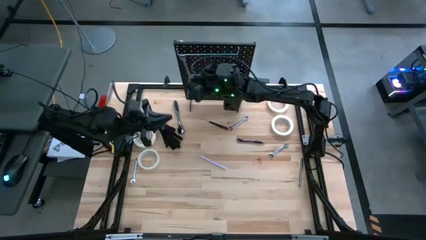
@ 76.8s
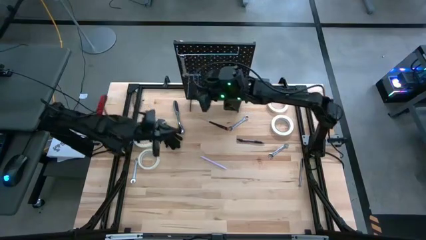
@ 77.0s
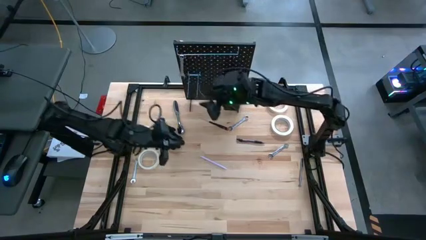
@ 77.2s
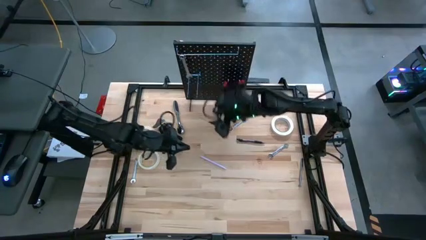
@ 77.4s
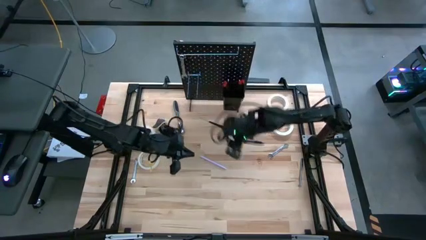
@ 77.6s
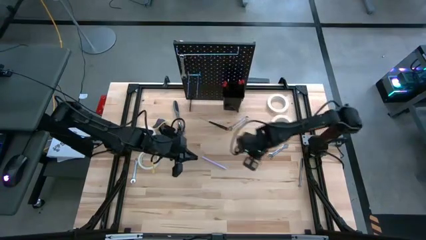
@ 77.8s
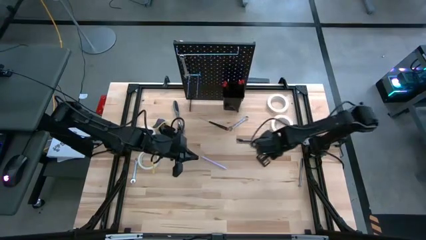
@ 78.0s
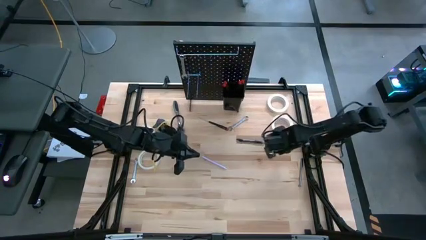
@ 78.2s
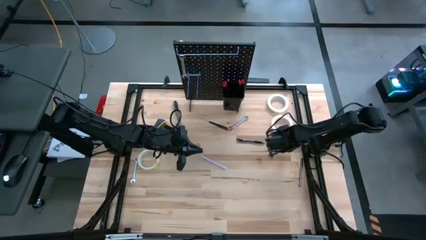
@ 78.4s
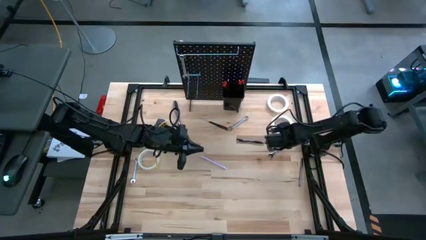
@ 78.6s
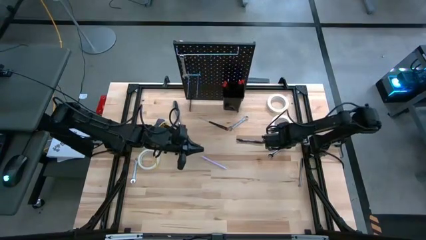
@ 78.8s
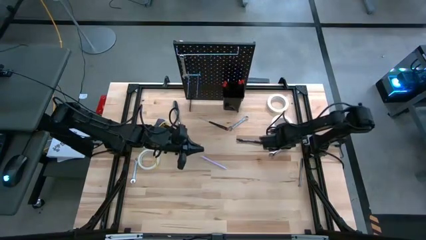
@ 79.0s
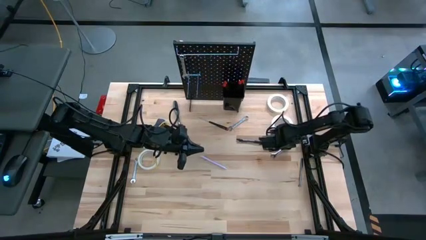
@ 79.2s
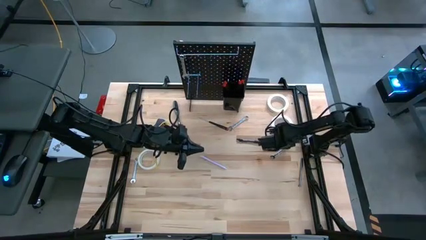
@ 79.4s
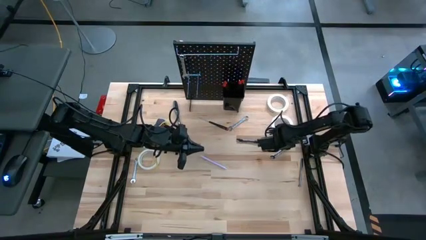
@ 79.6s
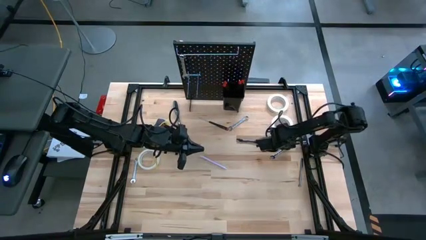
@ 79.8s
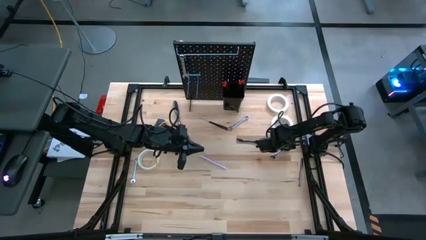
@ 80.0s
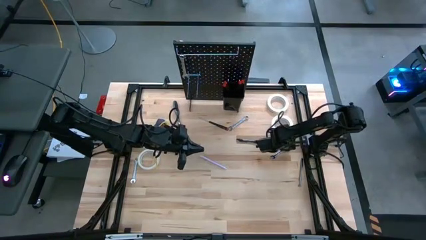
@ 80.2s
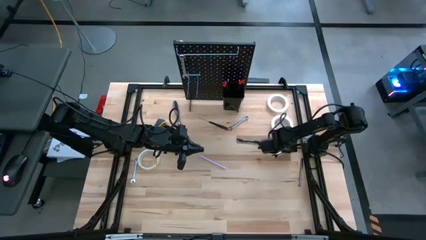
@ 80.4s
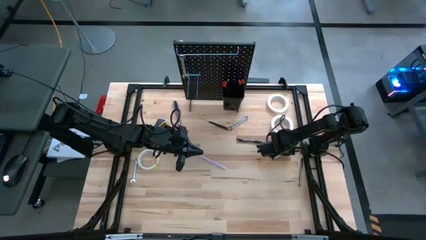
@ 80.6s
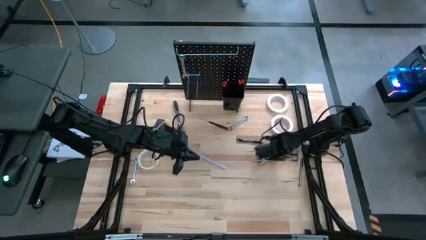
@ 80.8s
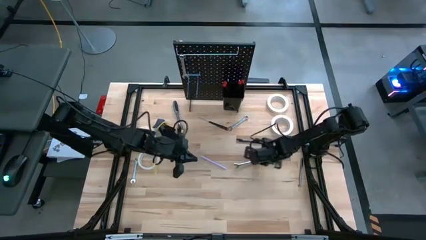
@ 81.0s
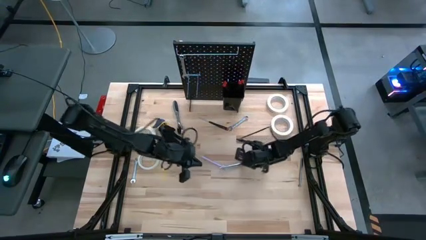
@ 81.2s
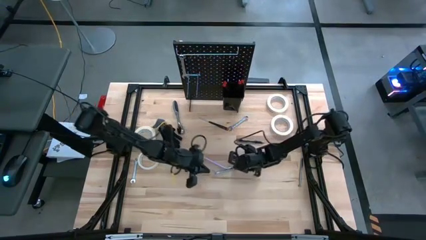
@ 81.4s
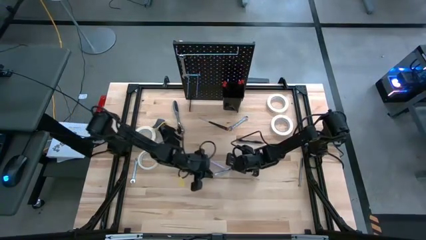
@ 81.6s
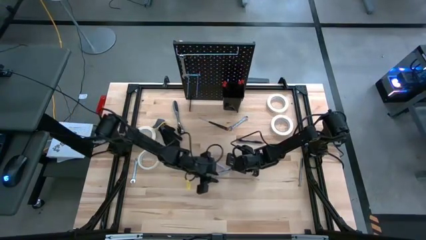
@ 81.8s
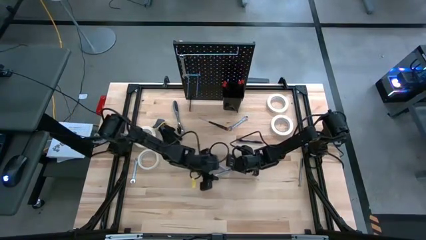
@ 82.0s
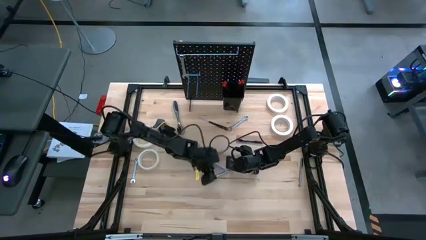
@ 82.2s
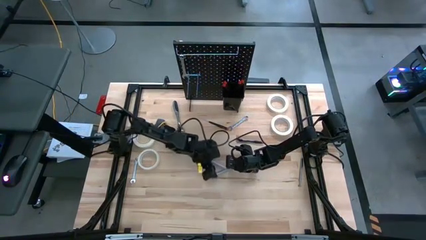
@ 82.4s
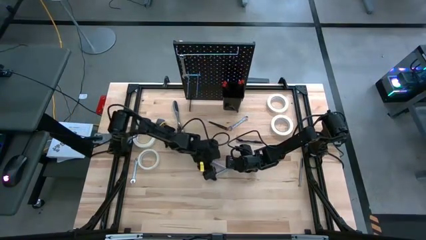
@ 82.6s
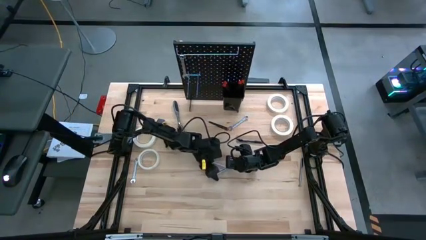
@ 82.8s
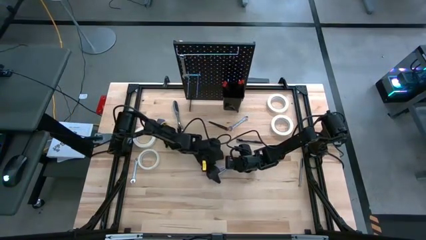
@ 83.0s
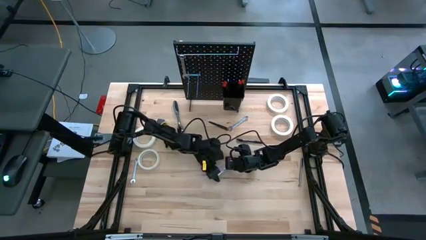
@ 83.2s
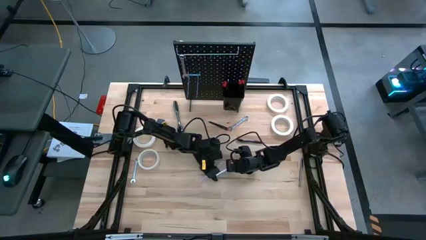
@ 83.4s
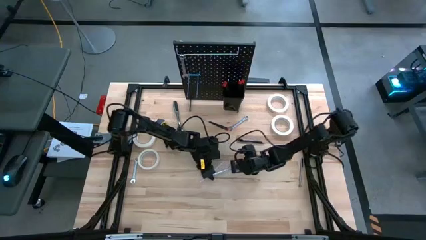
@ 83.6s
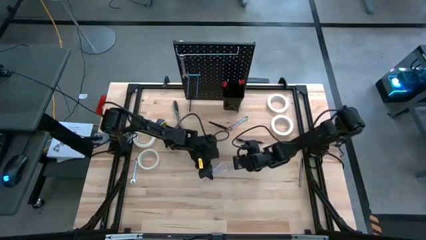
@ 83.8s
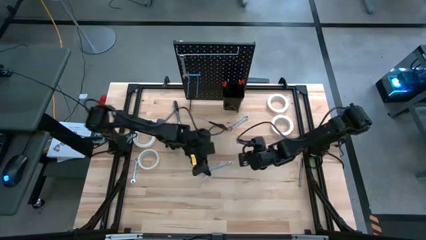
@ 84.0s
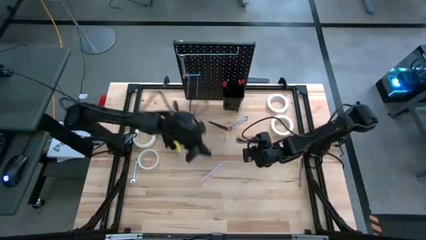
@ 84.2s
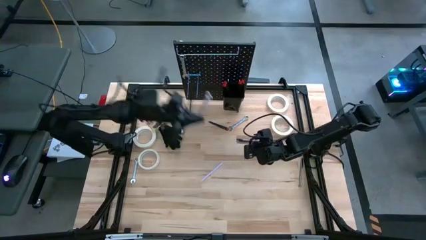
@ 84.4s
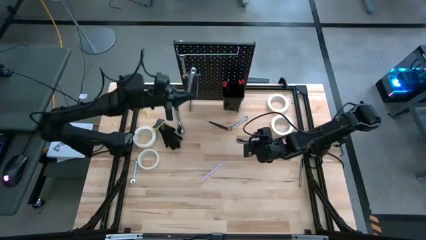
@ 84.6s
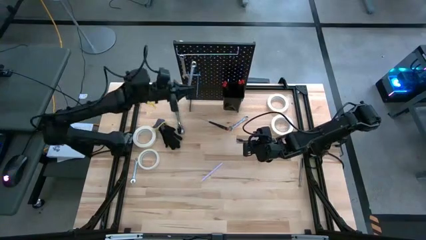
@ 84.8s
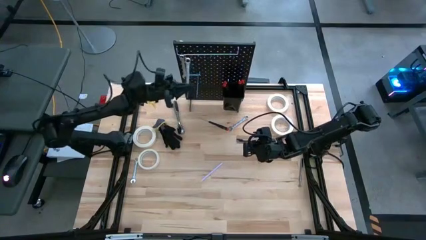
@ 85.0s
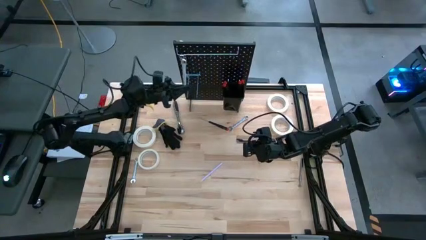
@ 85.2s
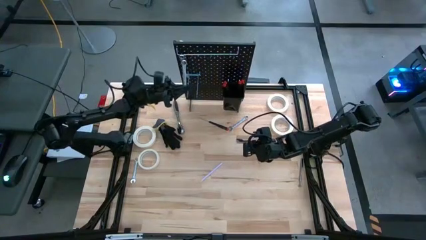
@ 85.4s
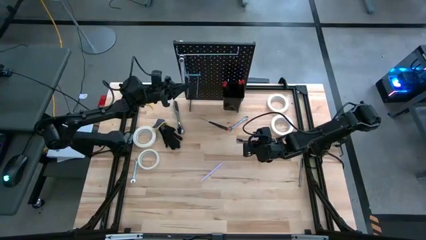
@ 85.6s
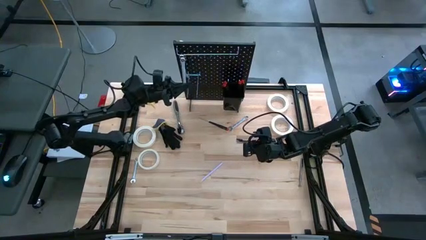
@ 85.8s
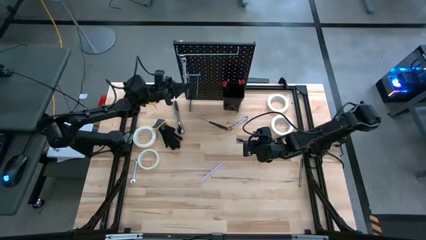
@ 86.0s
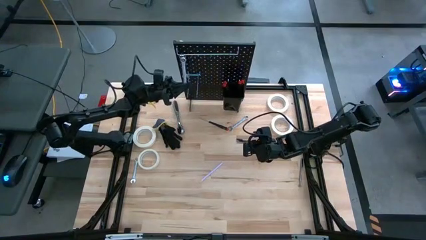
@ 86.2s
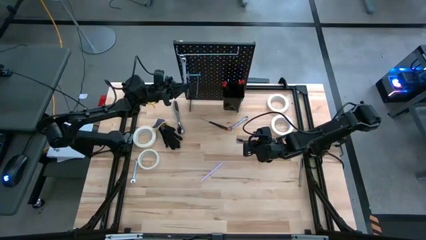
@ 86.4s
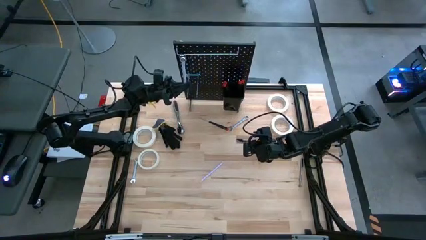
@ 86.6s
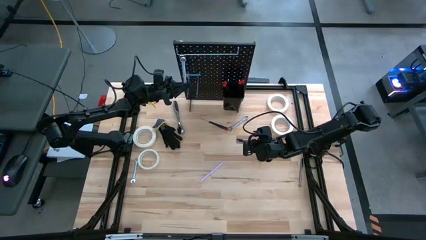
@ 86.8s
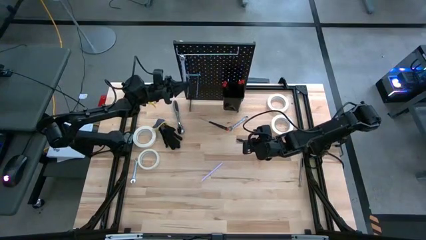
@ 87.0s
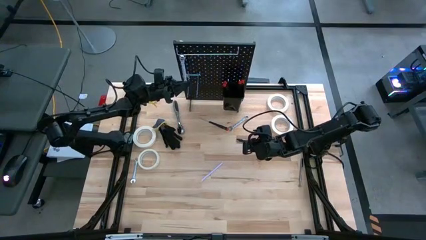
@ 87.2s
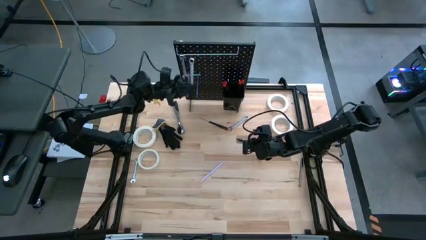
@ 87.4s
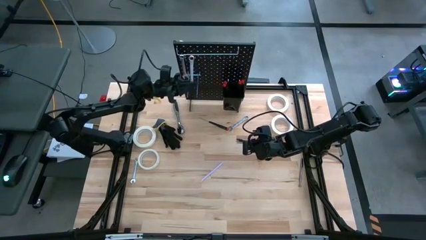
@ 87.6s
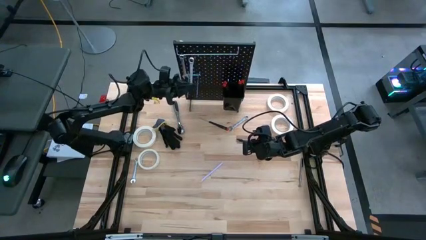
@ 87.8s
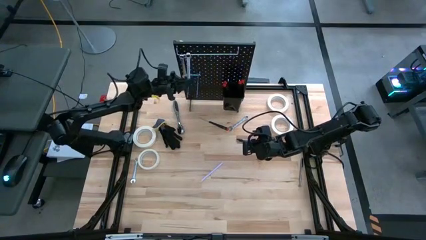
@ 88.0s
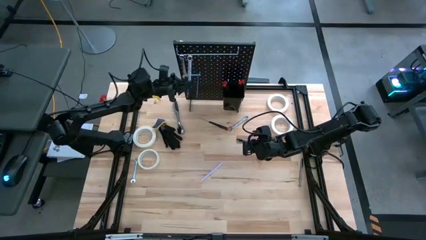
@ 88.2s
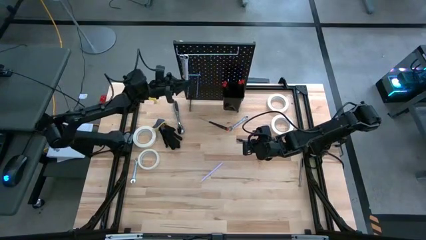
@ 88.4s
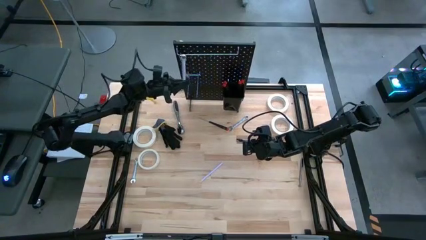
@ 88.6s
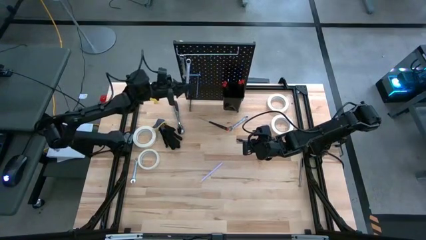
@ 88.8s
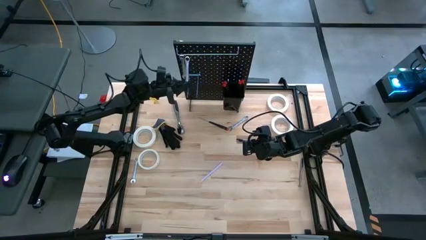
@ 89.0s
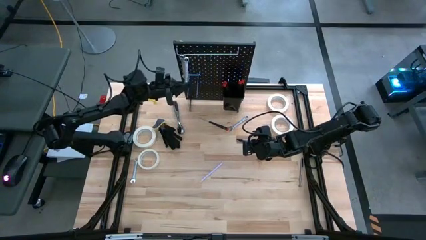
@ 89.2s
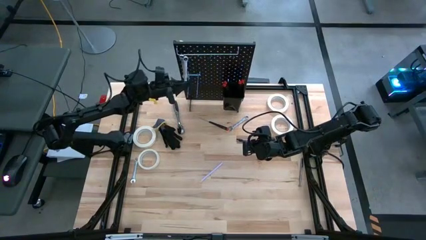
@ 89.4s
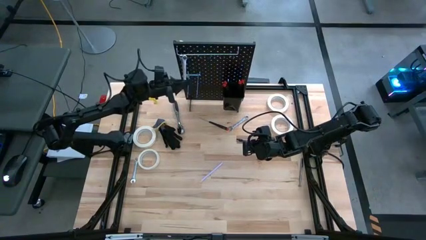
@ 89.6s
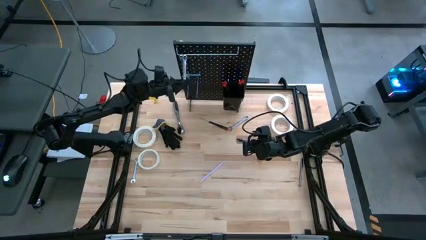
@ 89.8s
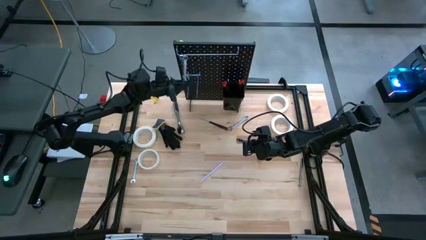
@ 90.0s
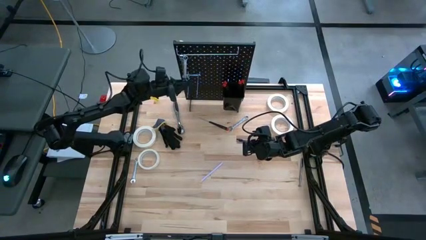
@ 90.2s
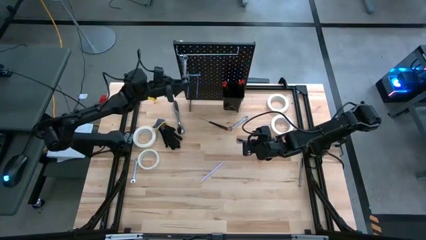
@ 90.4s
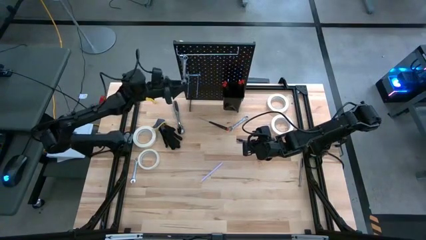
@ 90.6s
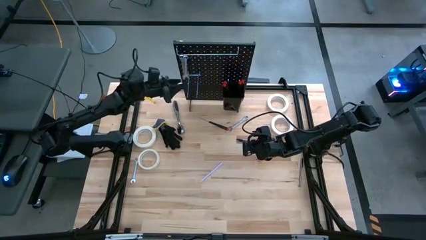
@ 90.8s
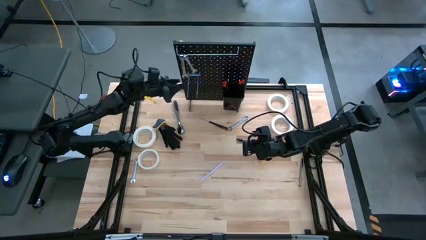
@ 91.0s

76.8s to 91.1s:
Task: Hang tools onto peg board
Hang the wrench onto the peg board
